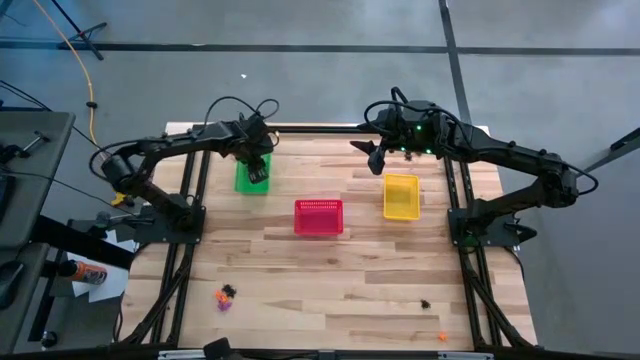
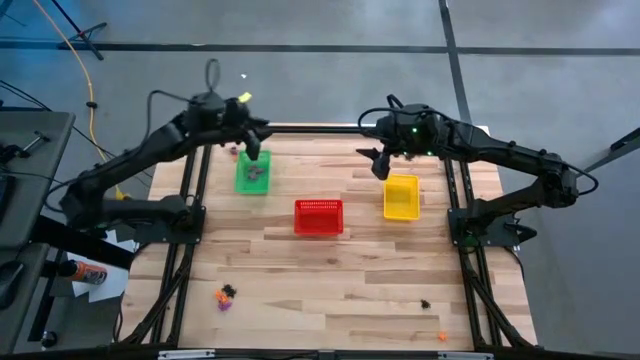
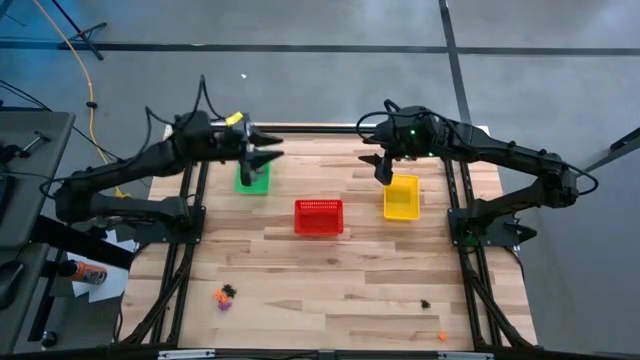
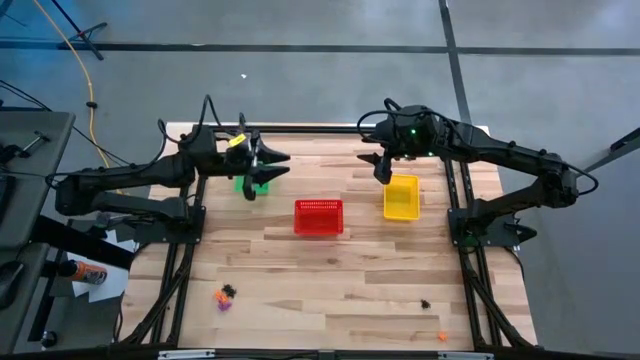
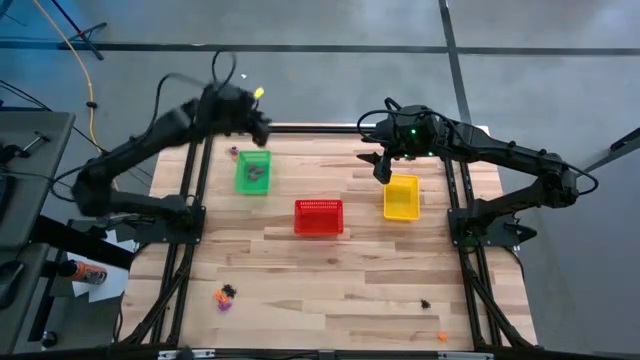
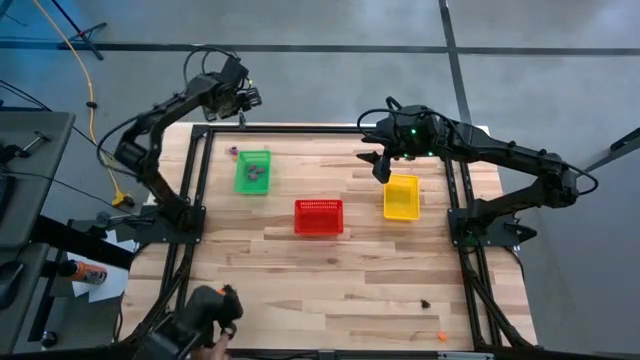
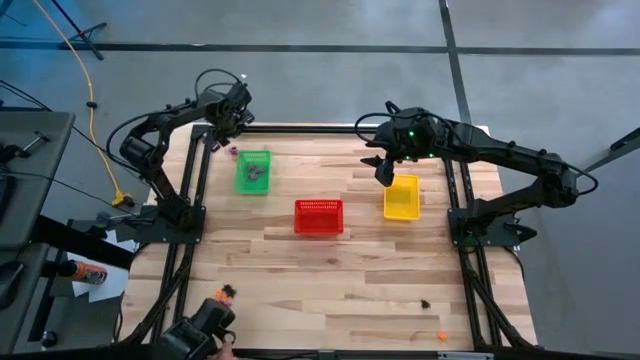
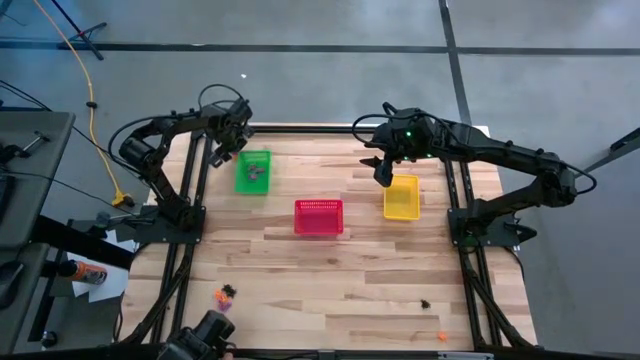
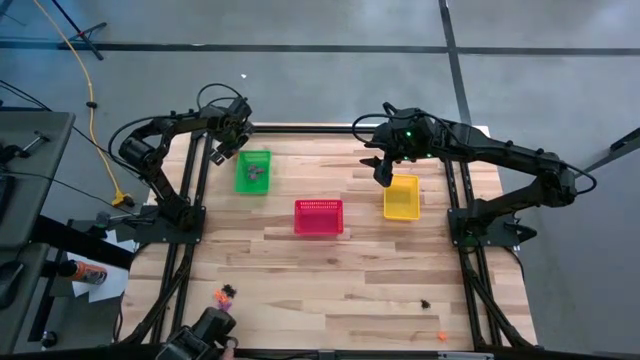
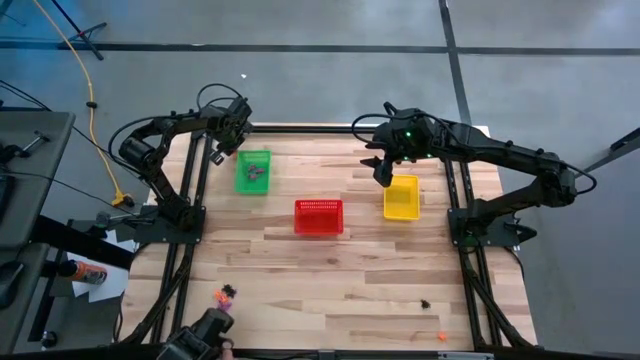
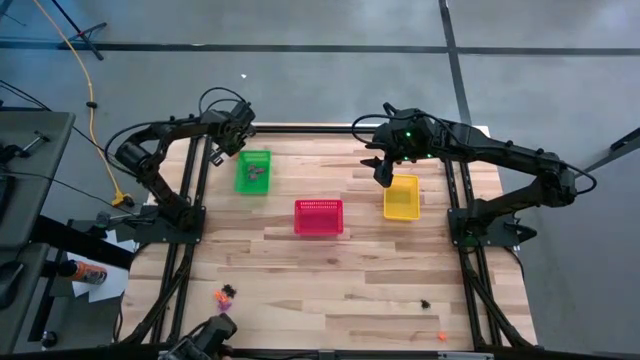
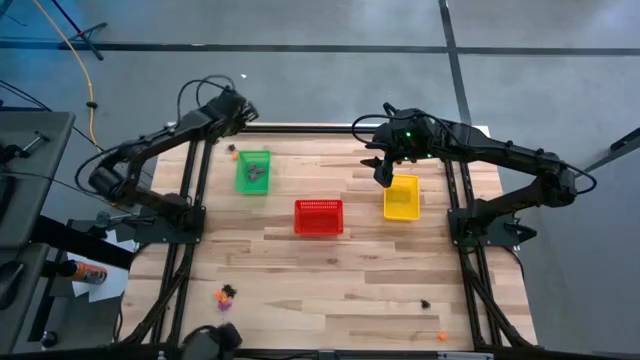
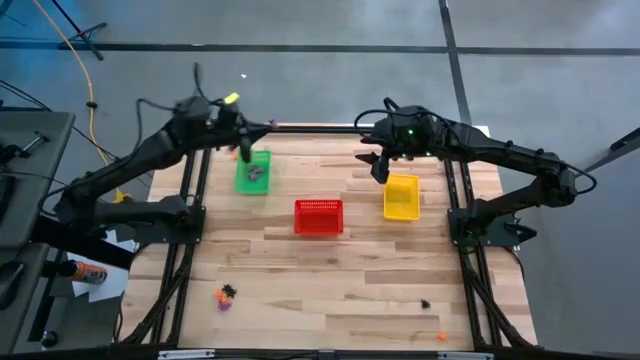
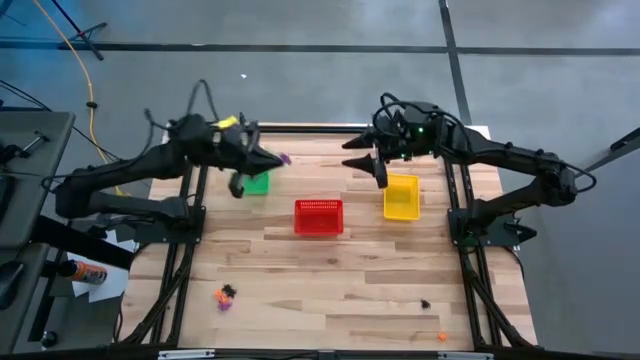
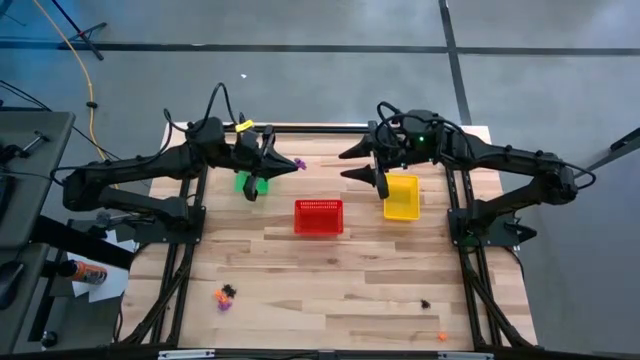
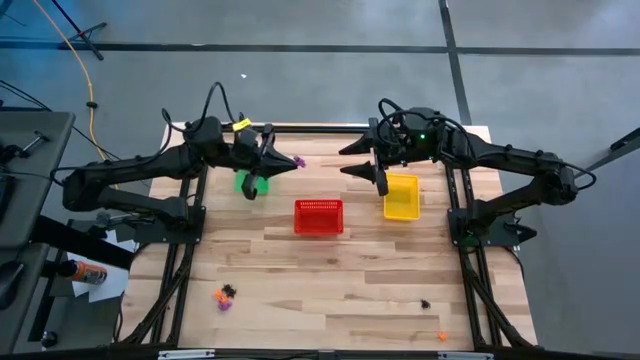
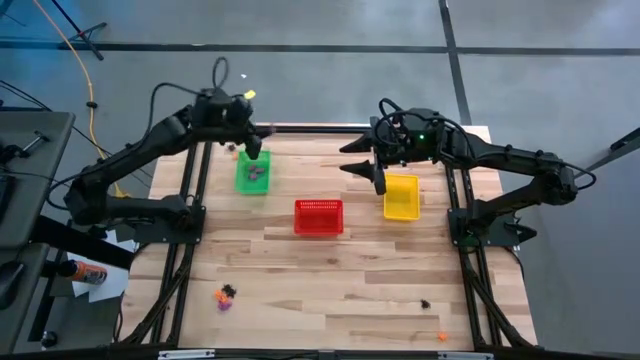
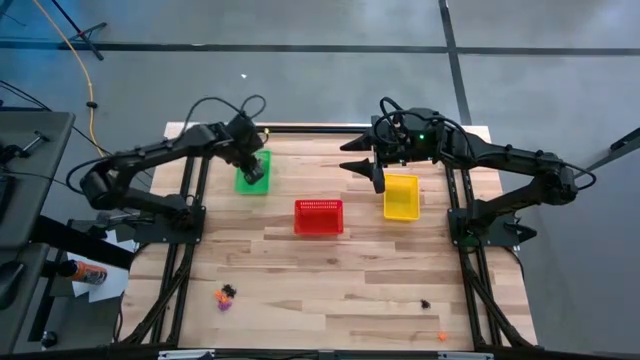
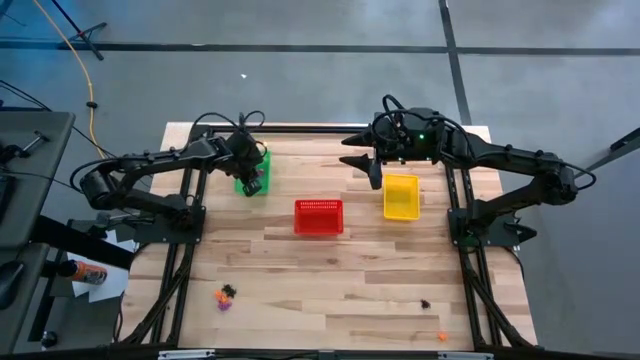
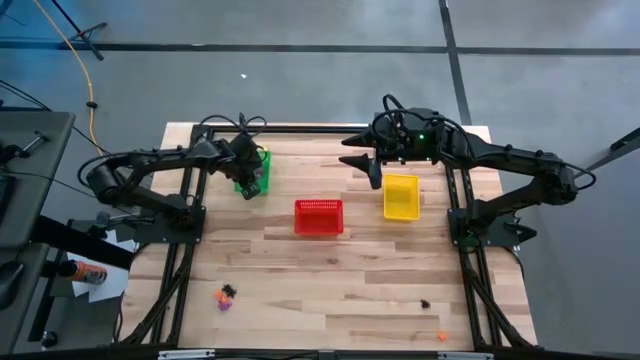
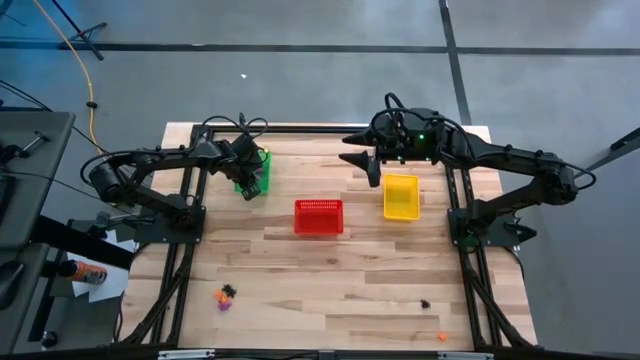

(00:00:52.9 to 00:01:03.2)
Task: Sort Halloween decoration
Put the purple skeleton toy into the green bin

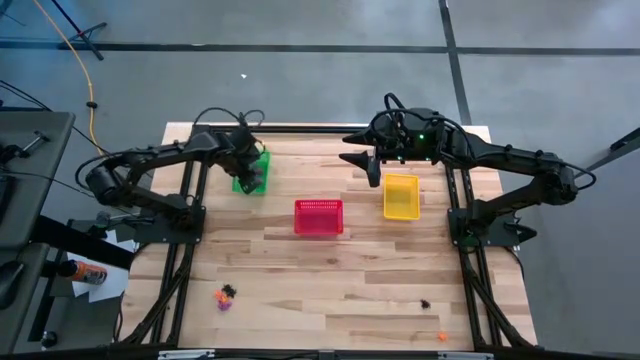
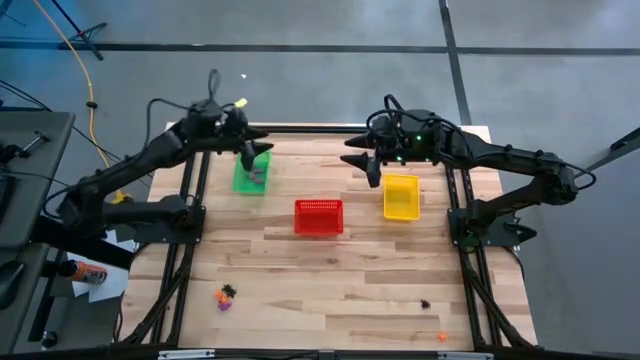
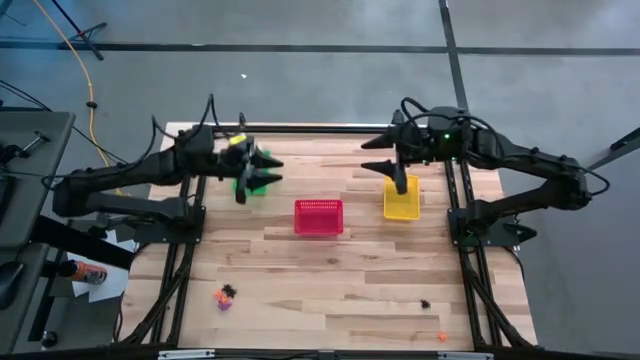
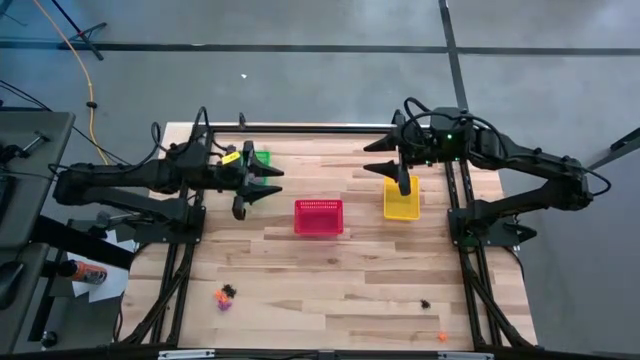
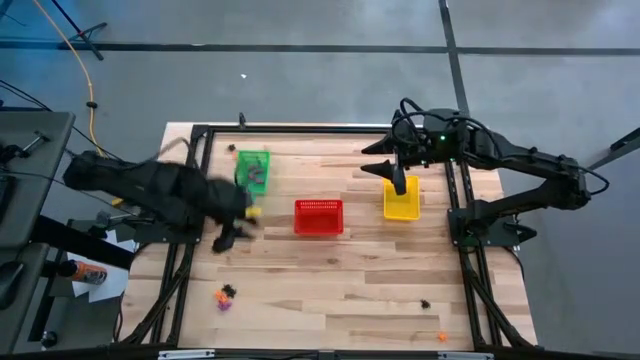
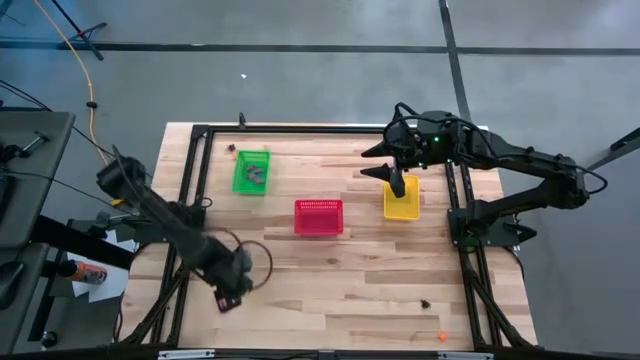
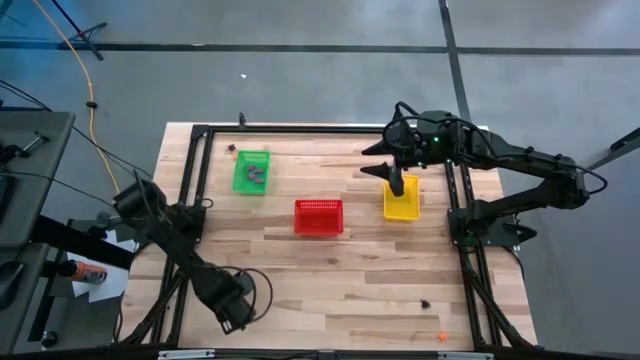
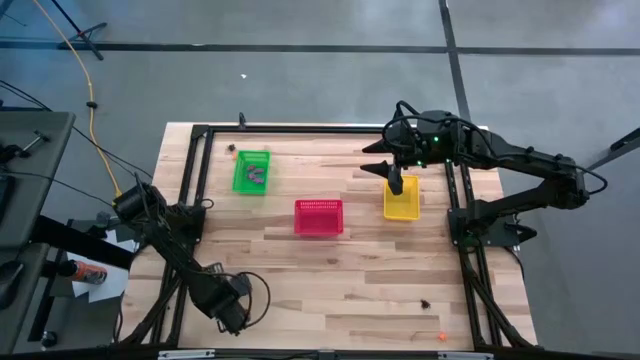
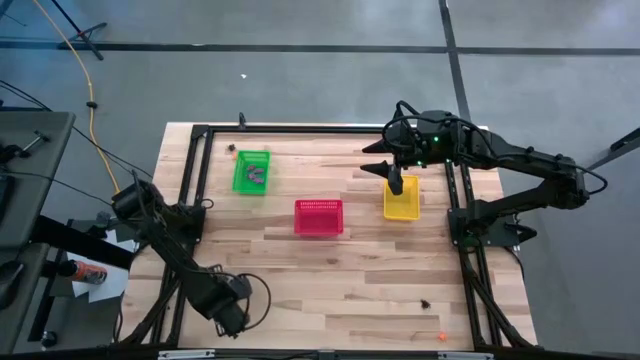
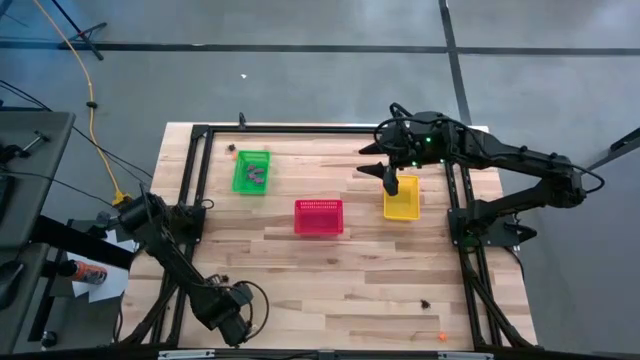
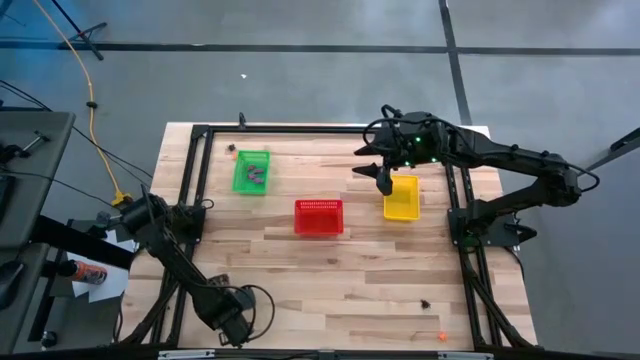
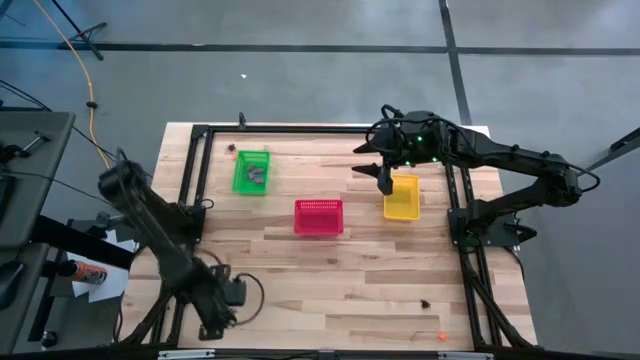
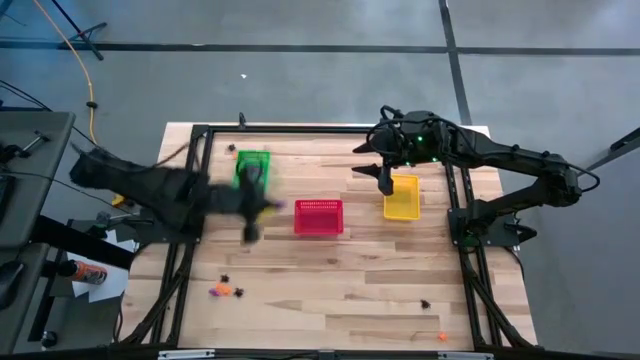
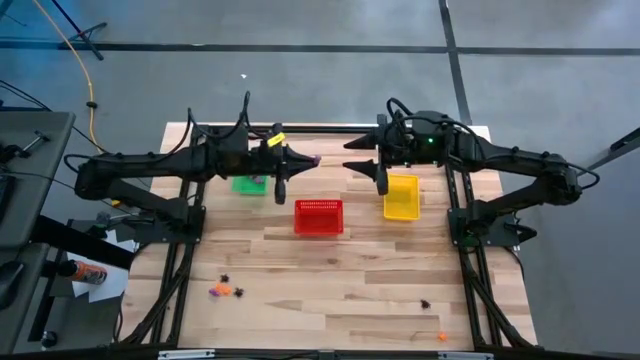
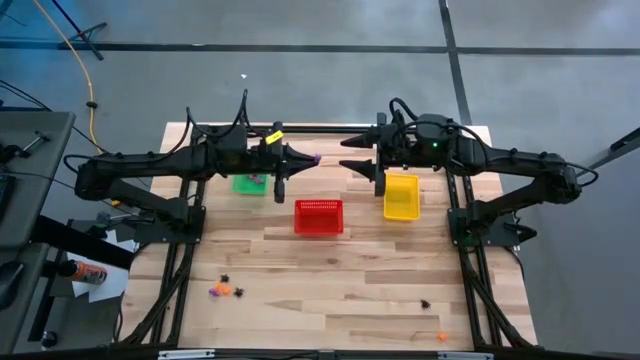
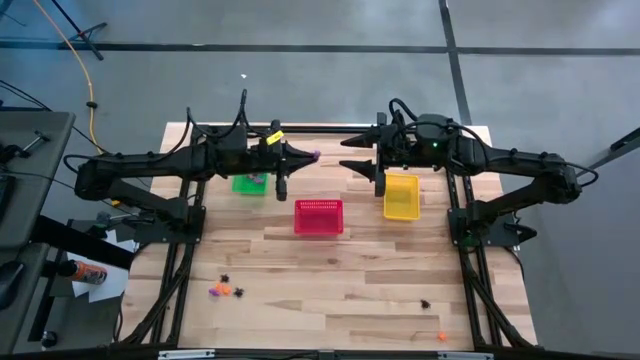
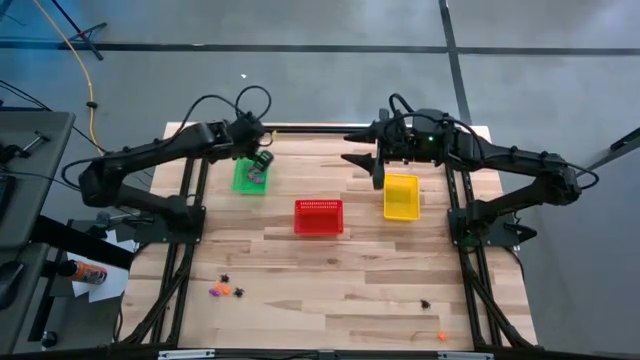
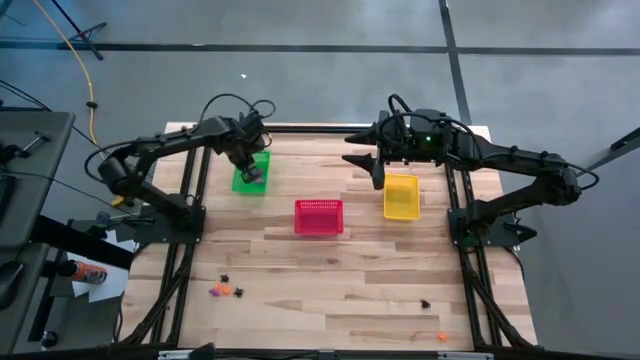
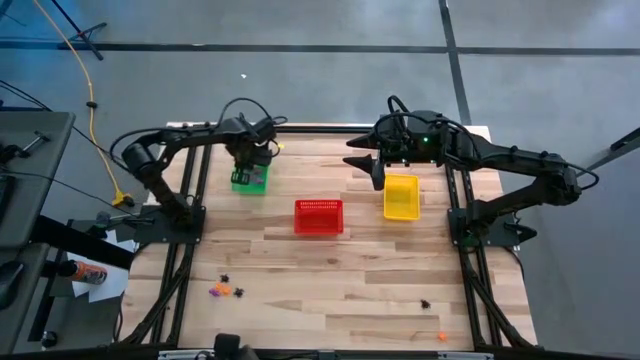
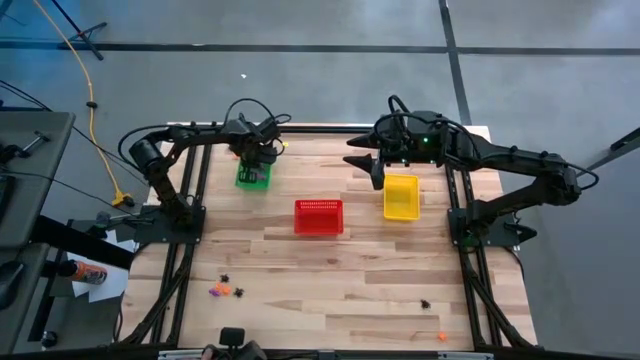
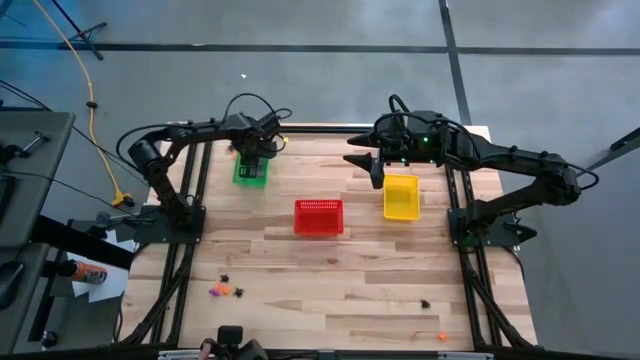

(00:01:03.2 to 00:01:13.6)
Put the purple skeleton toy into the green bin
